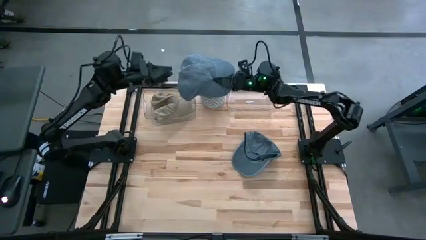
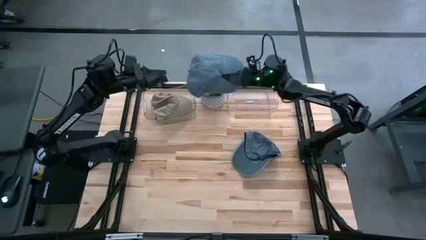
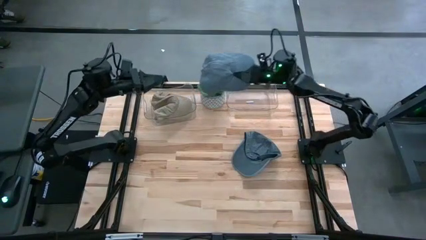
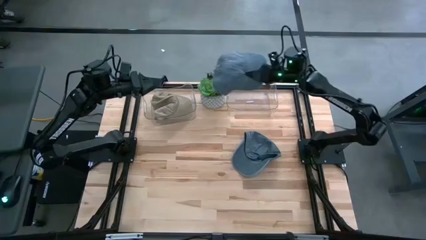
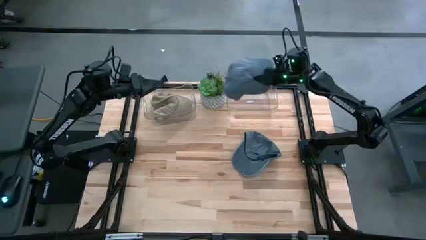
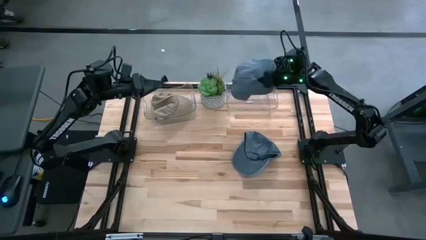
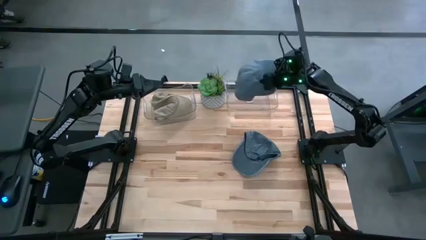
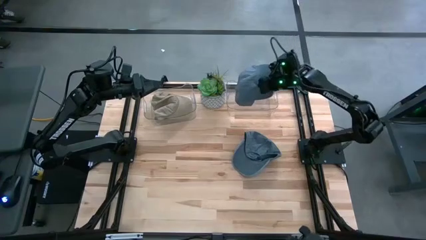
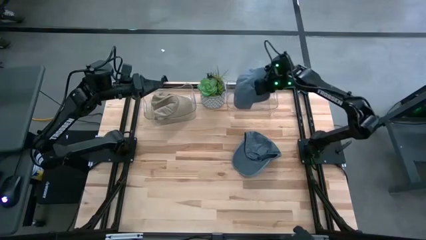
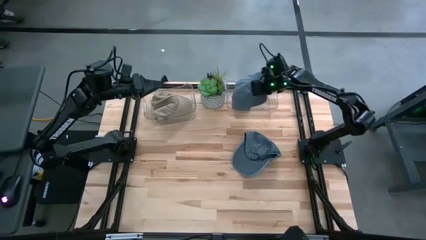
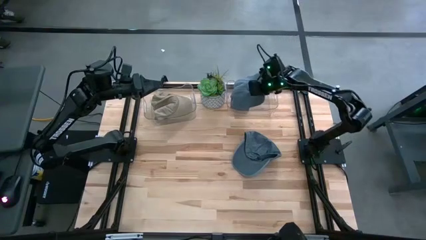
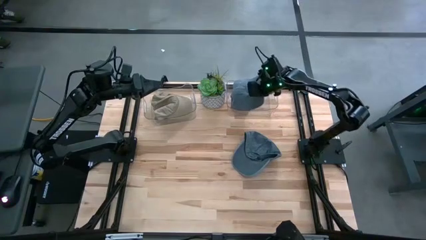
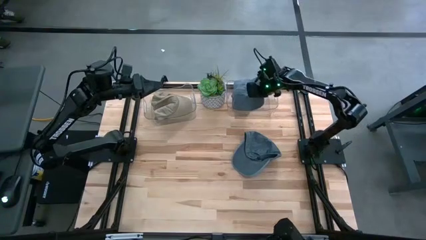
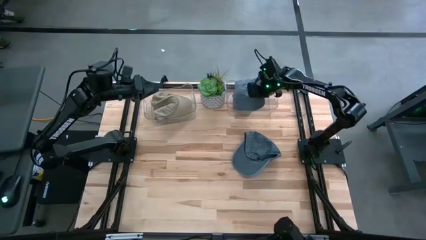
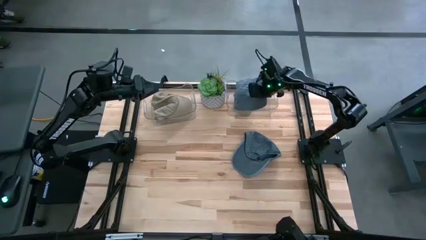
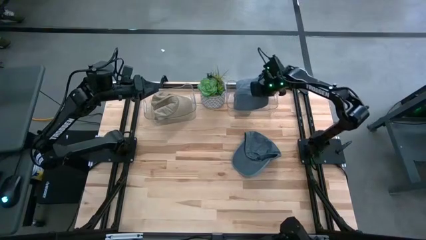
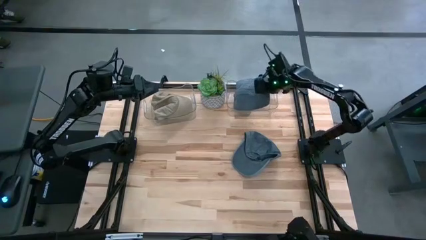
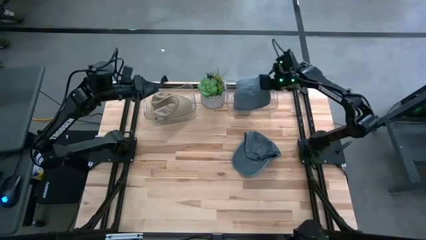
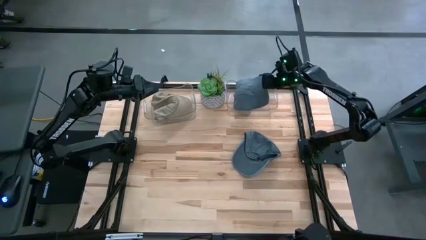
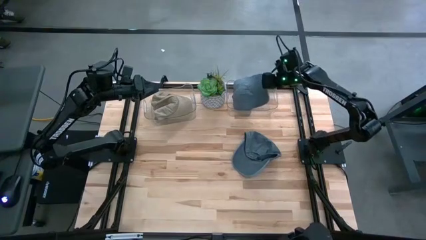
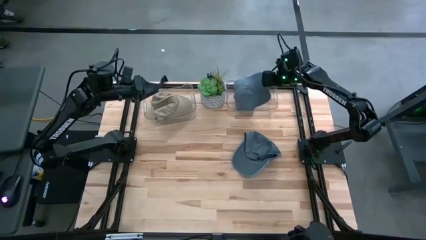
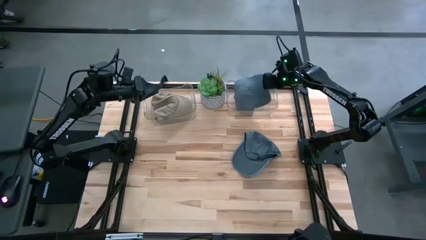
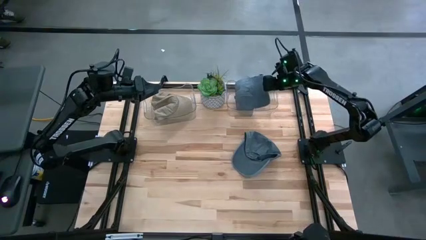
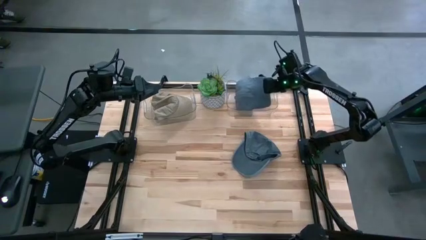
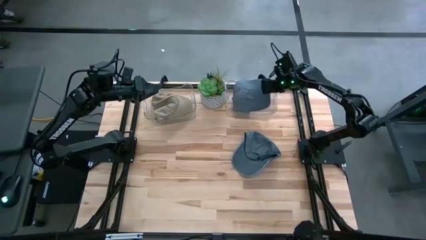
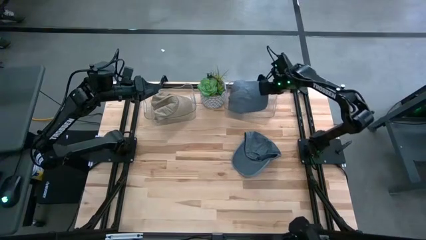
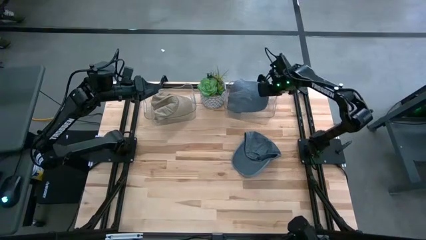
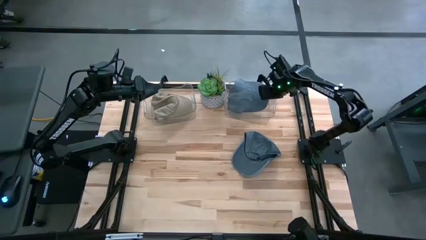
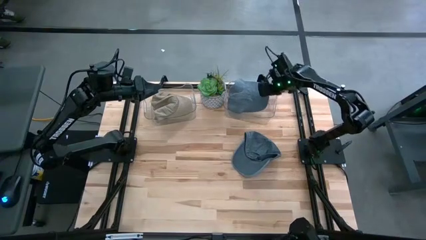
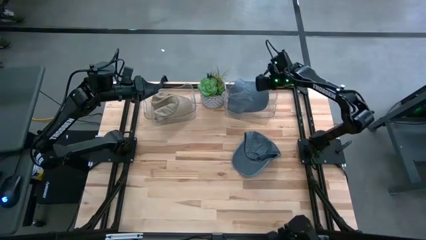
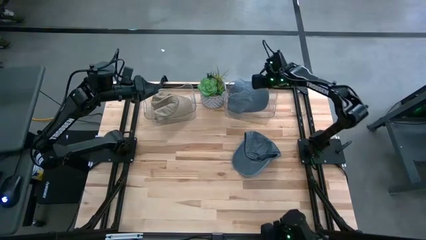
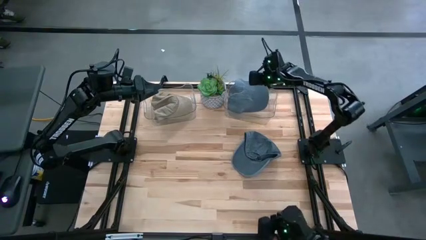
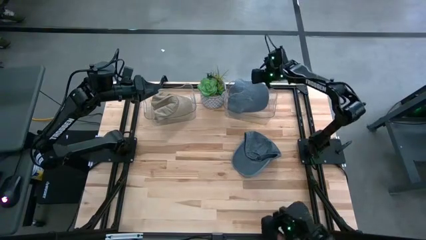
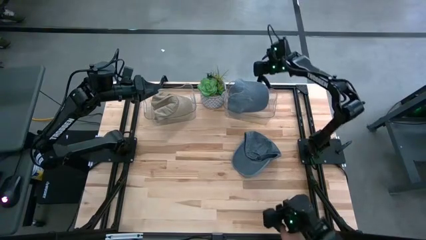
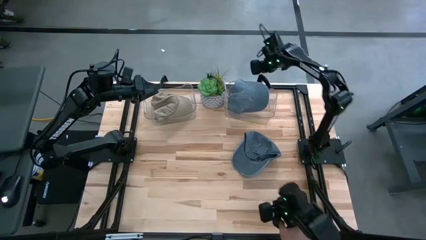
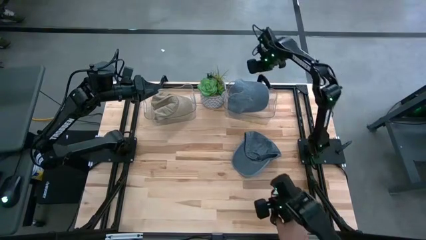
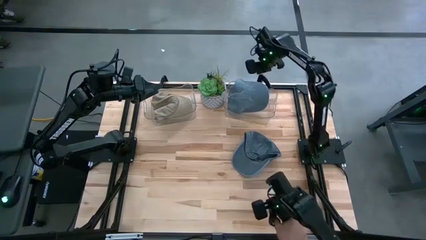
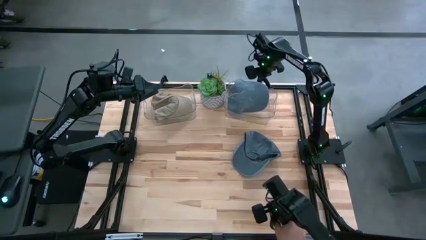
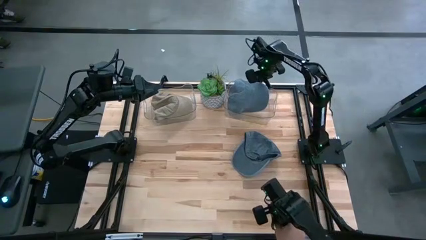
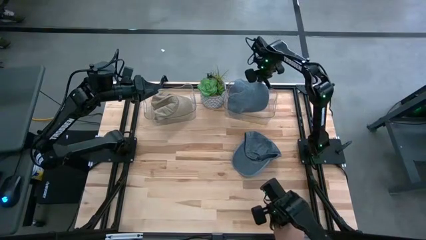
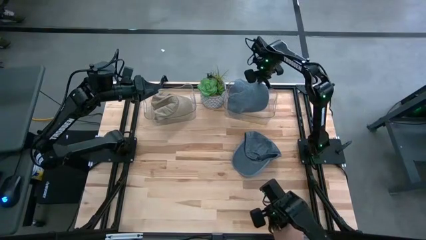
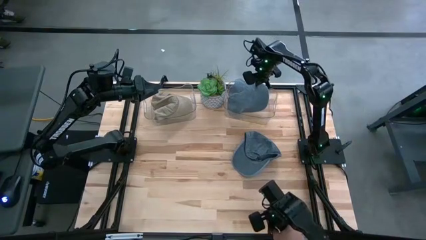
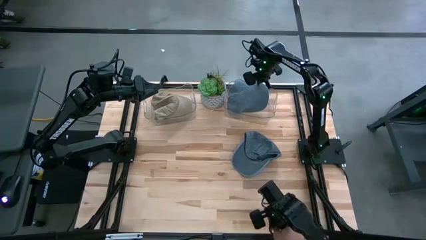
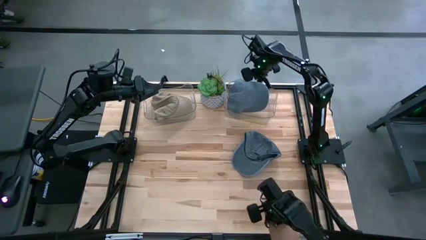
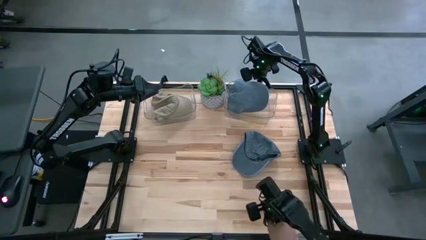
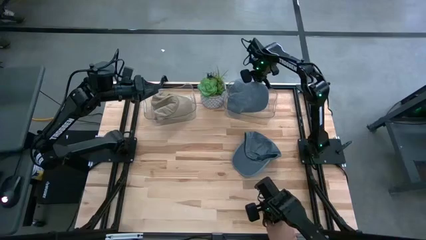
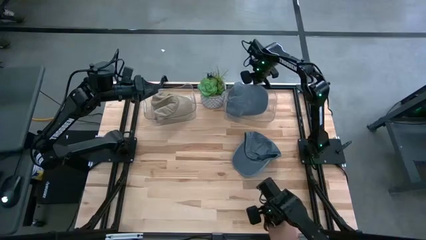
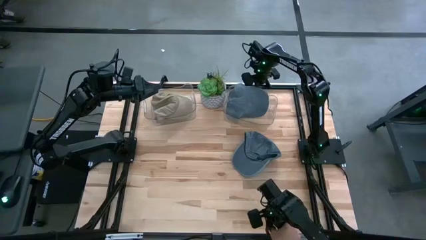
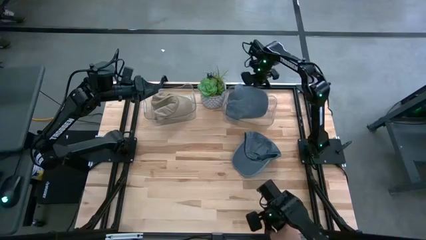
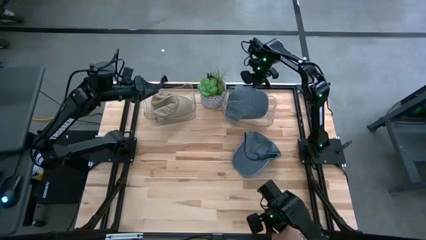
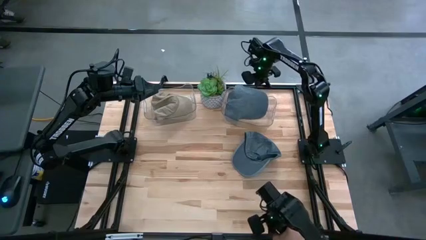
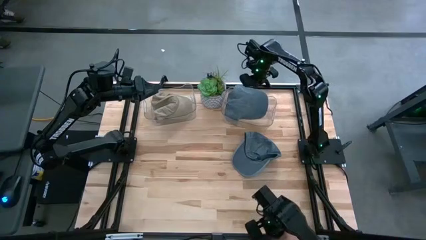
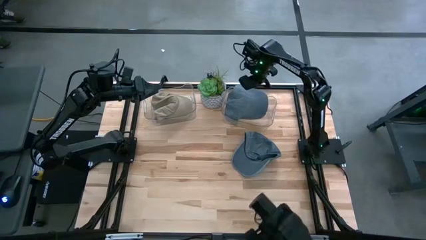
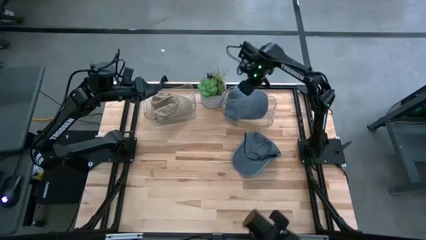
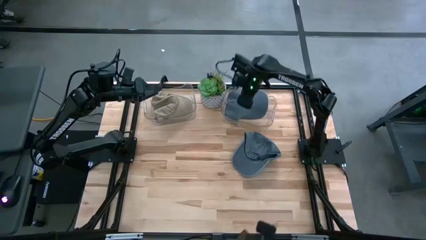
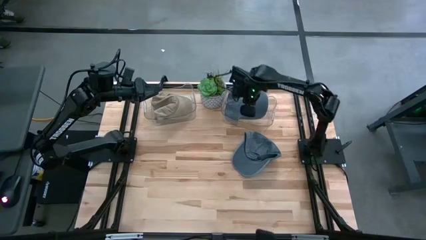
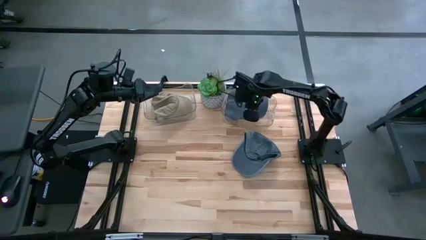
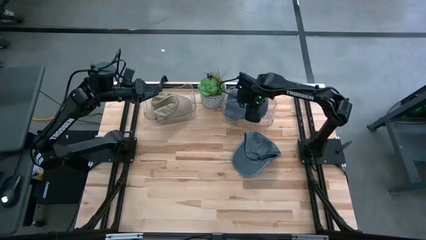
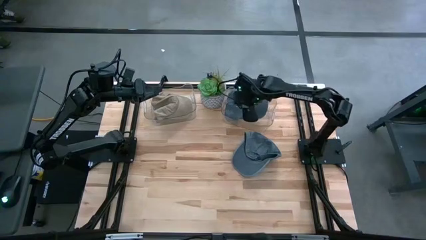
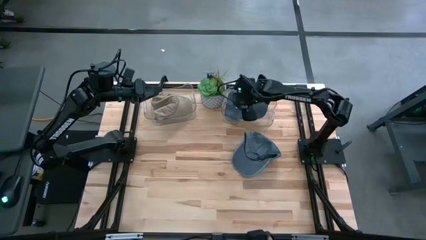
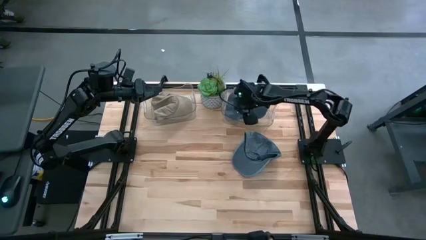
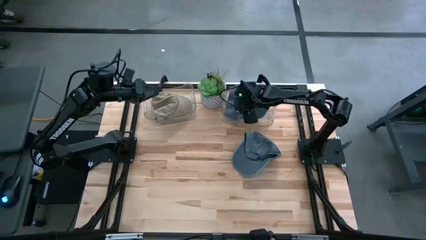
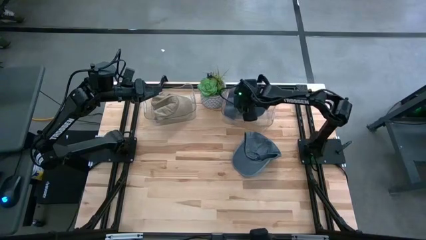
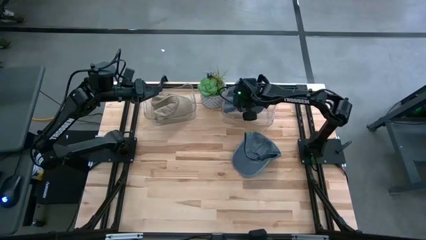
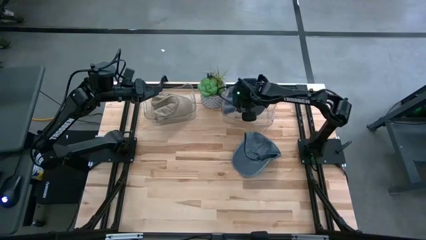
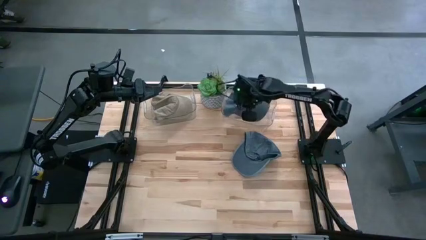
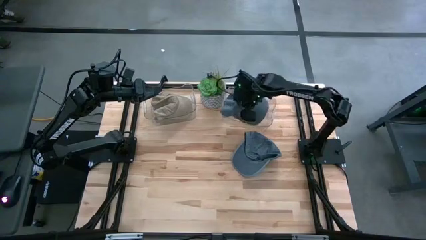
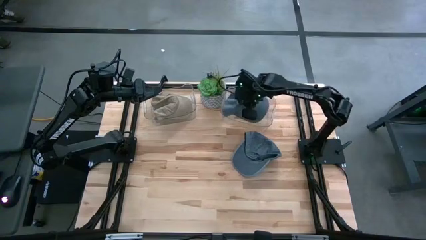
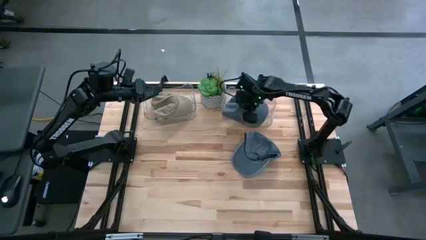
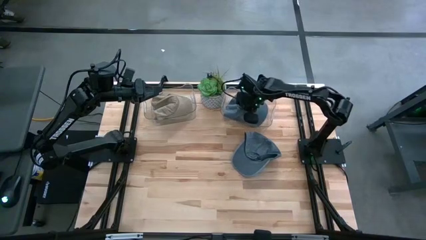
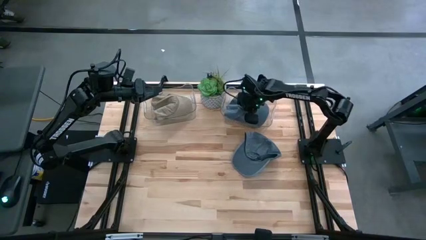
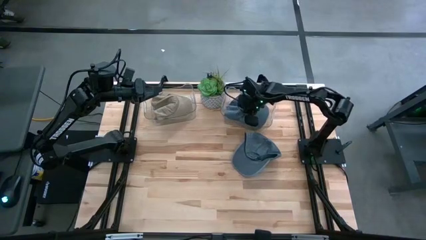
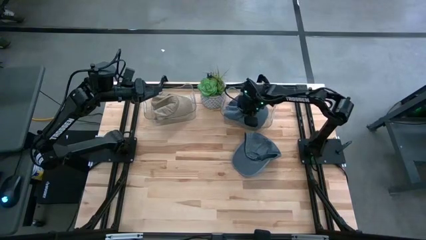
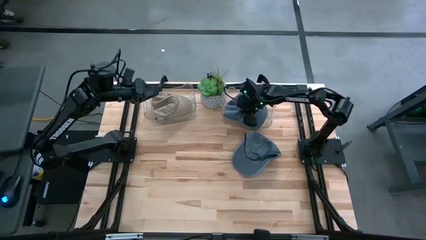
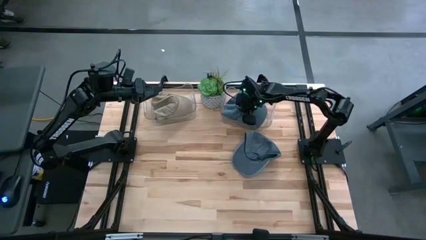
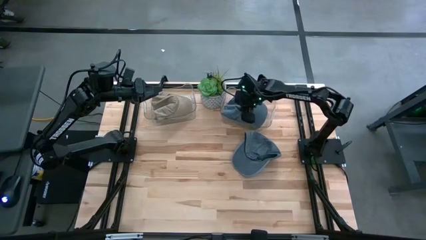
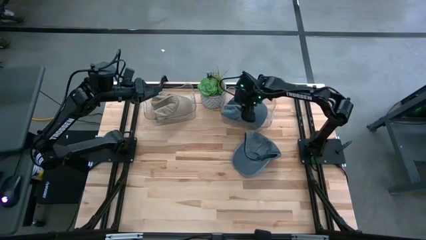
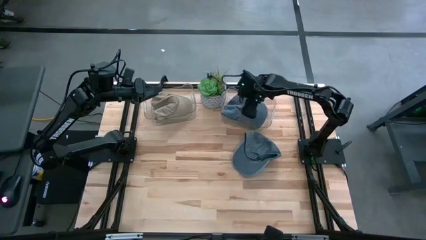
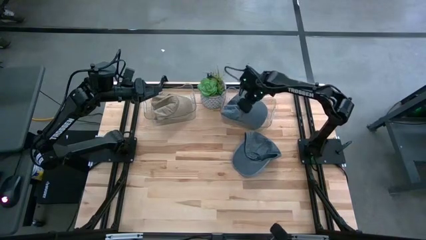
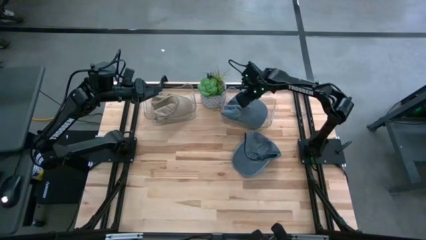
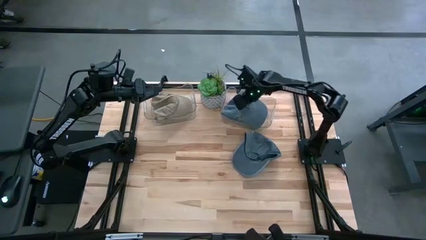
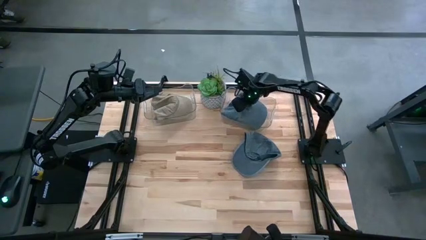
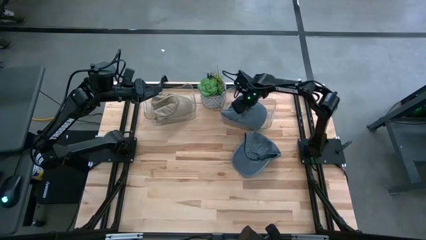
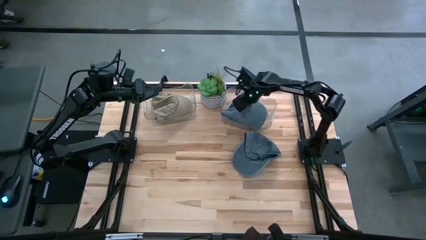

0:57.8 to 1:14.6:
Task: Pick & Place hat
Put the left blue cap into the right transparent bin
